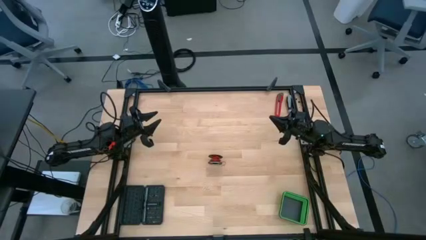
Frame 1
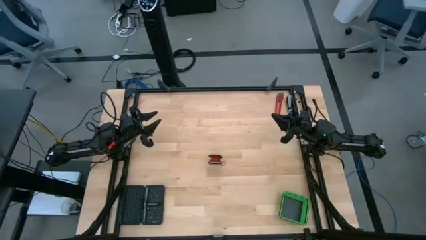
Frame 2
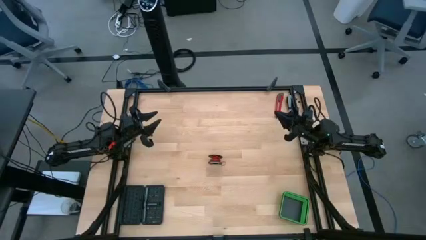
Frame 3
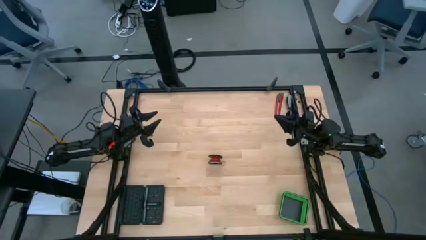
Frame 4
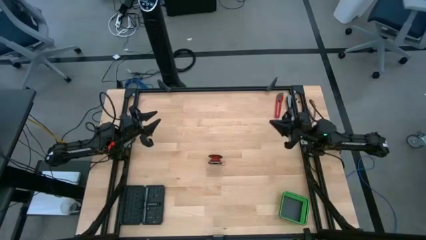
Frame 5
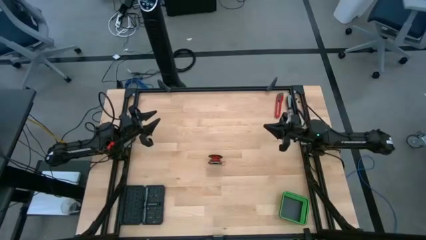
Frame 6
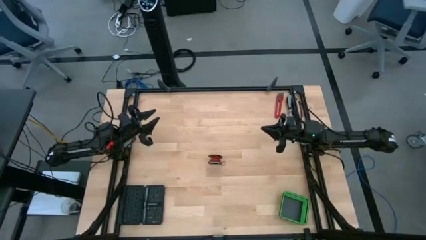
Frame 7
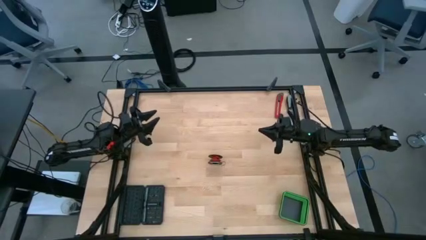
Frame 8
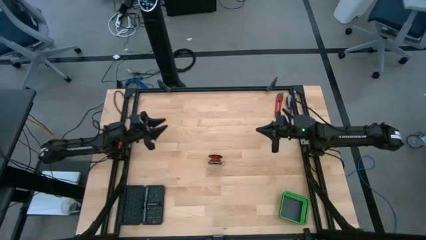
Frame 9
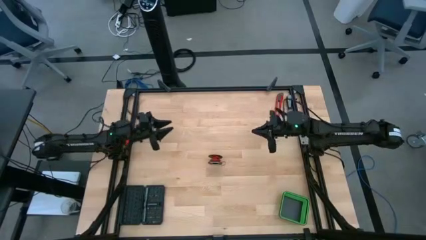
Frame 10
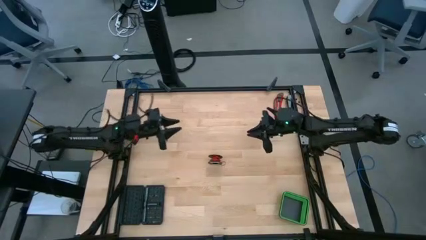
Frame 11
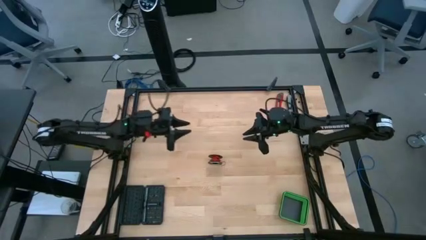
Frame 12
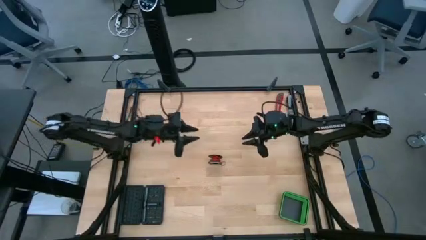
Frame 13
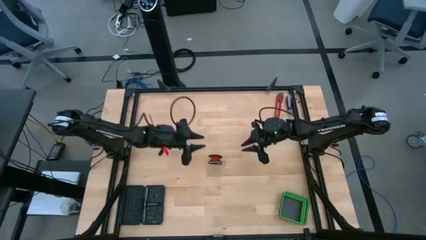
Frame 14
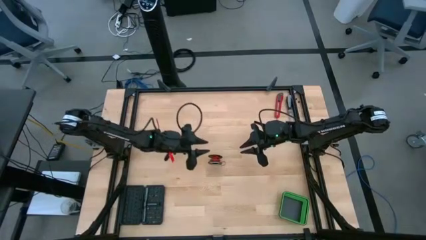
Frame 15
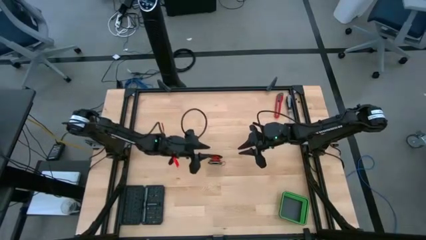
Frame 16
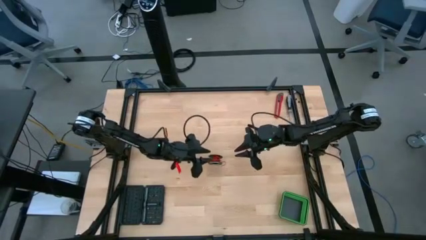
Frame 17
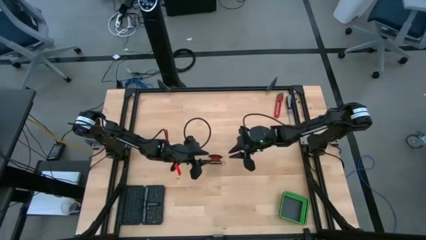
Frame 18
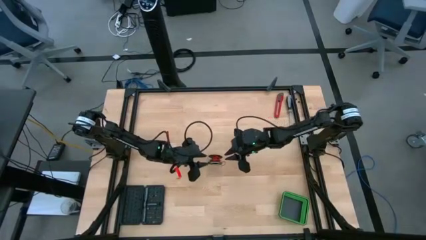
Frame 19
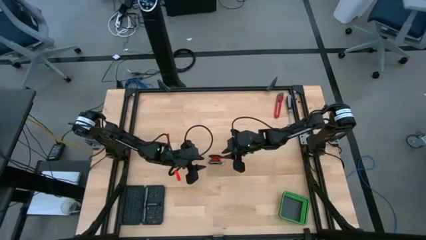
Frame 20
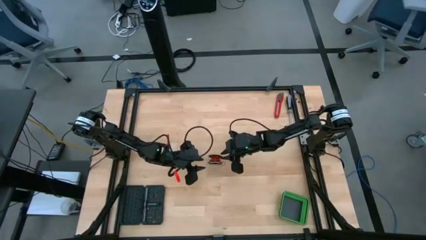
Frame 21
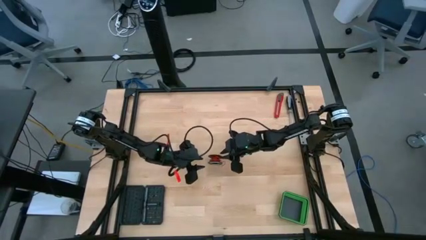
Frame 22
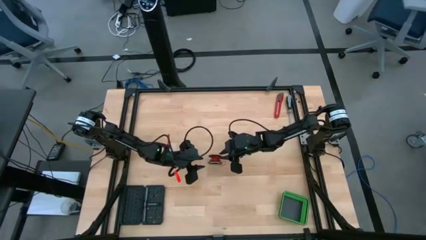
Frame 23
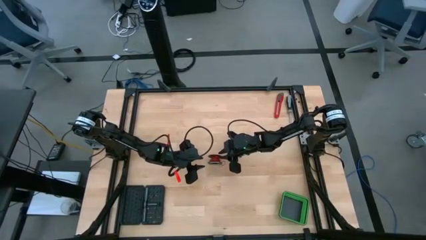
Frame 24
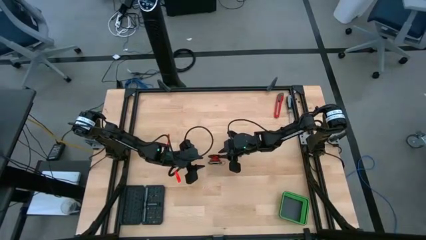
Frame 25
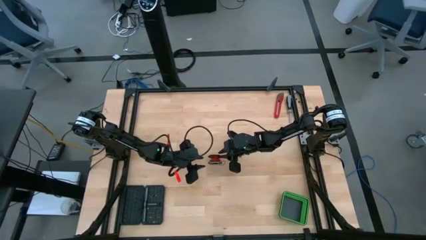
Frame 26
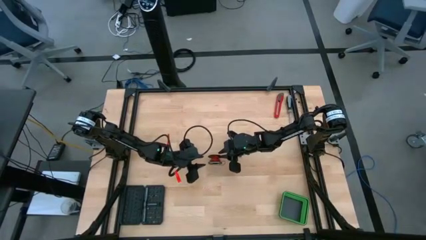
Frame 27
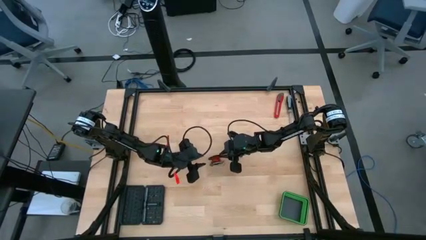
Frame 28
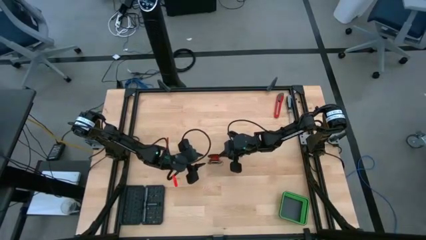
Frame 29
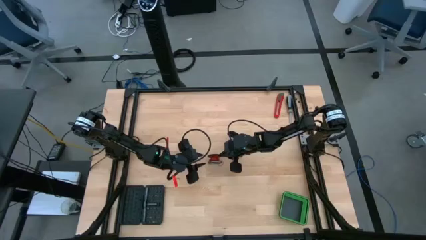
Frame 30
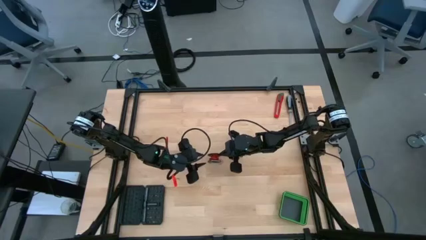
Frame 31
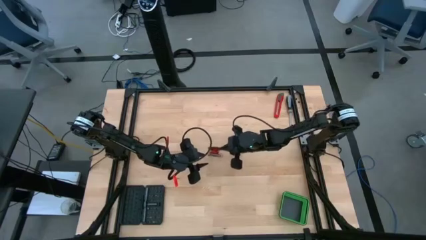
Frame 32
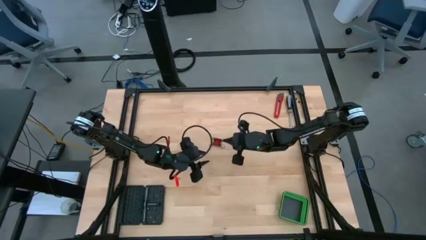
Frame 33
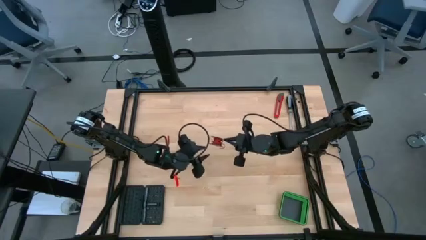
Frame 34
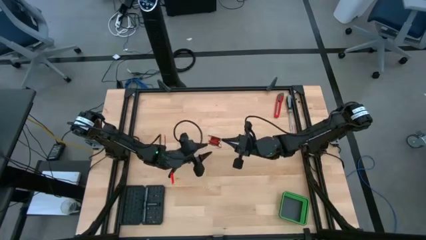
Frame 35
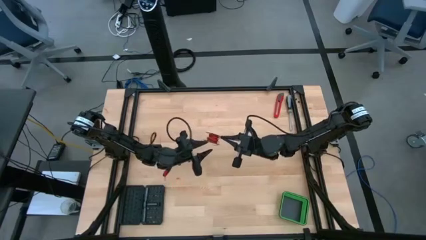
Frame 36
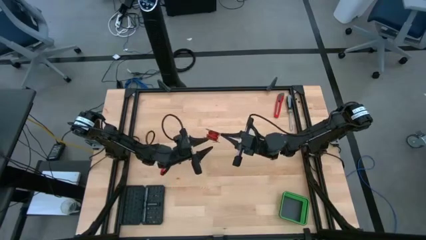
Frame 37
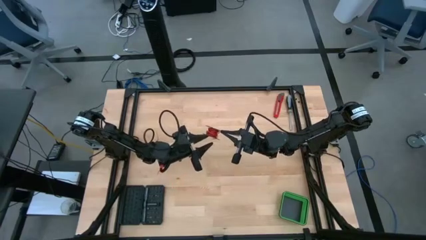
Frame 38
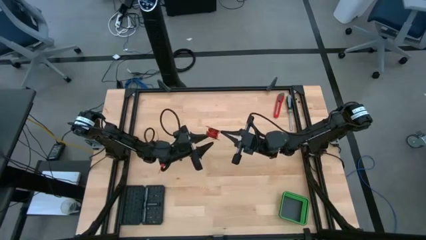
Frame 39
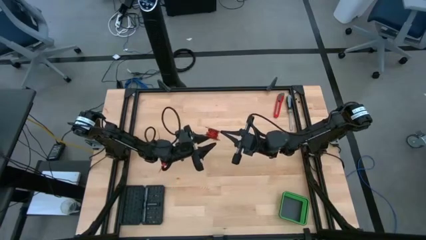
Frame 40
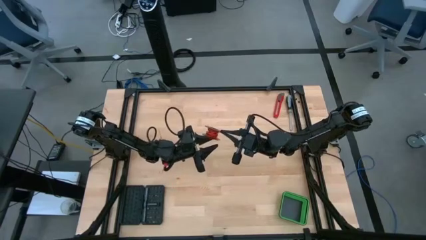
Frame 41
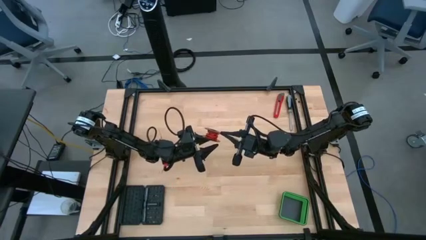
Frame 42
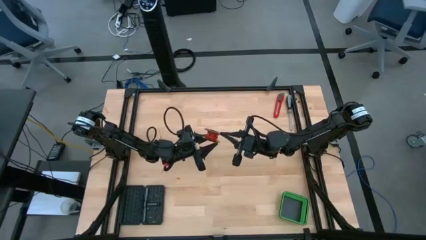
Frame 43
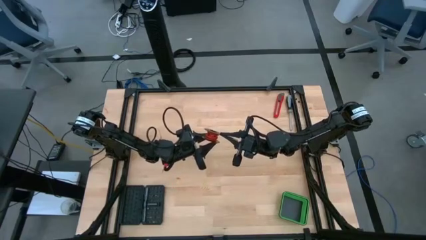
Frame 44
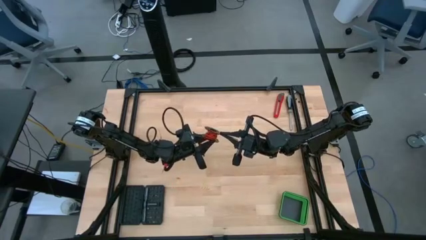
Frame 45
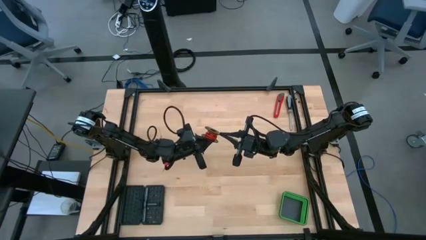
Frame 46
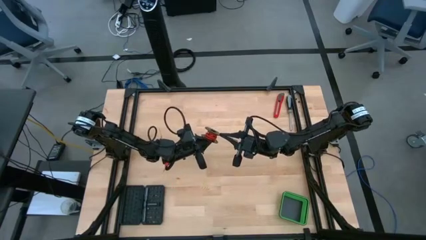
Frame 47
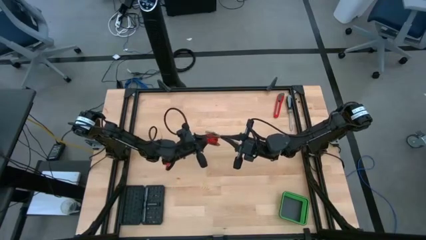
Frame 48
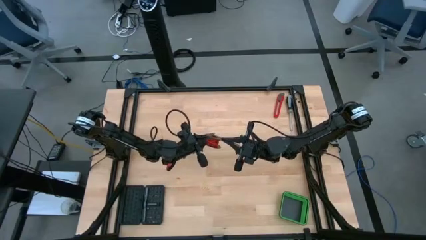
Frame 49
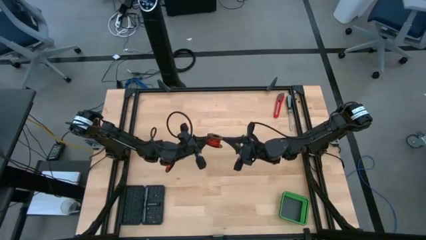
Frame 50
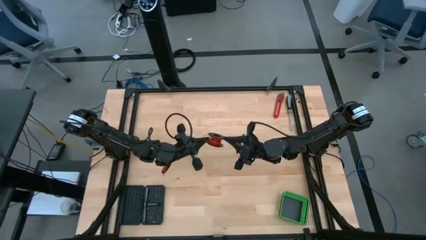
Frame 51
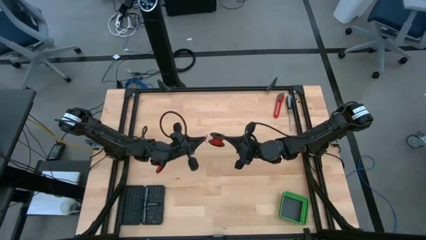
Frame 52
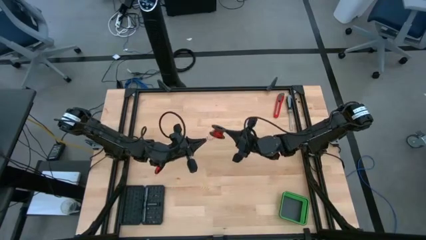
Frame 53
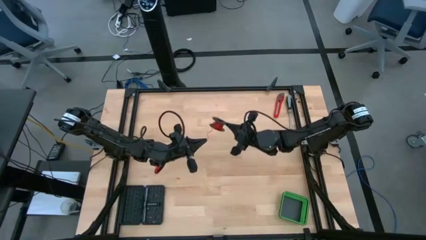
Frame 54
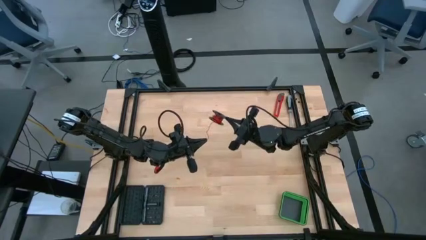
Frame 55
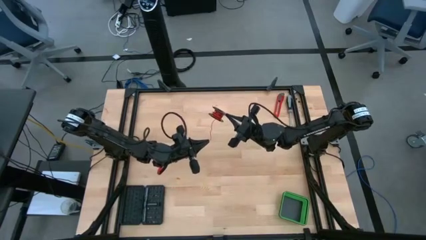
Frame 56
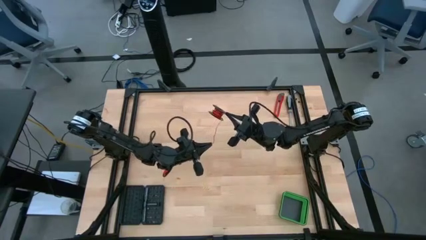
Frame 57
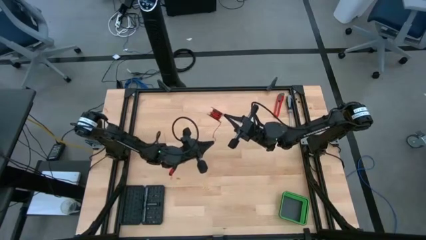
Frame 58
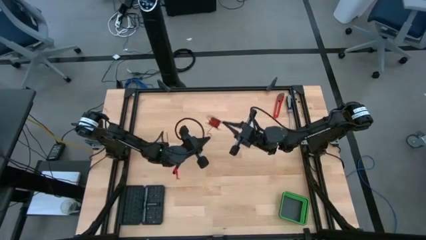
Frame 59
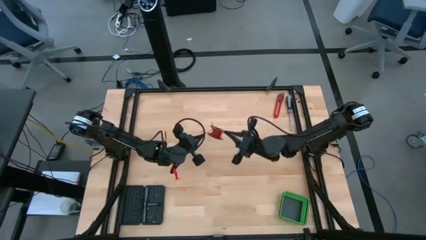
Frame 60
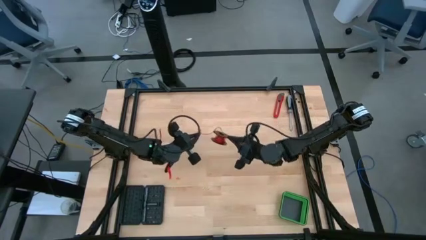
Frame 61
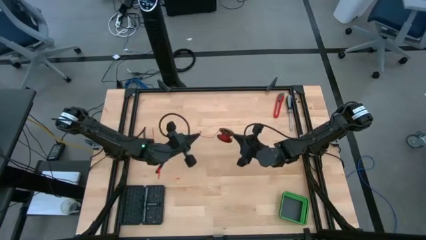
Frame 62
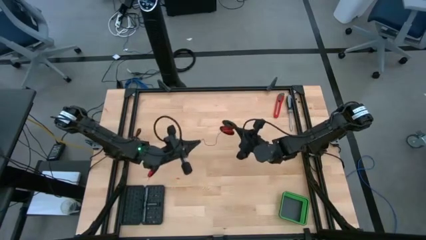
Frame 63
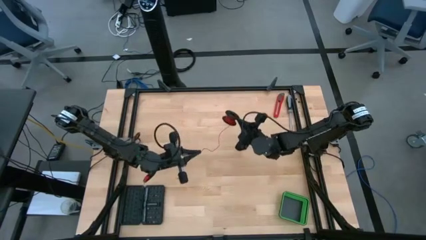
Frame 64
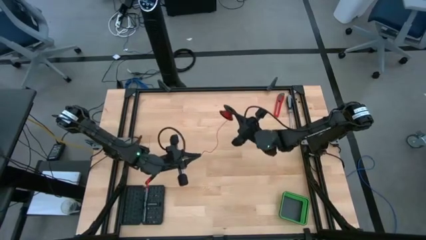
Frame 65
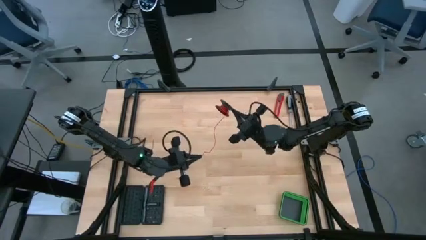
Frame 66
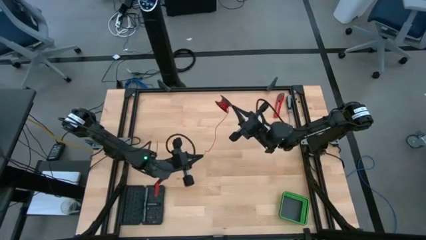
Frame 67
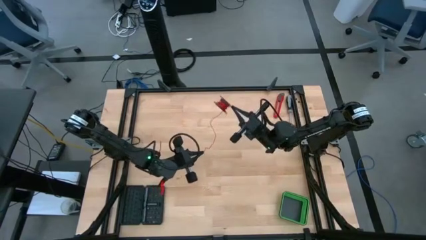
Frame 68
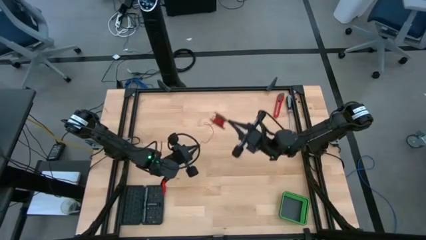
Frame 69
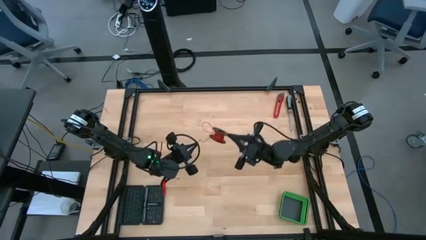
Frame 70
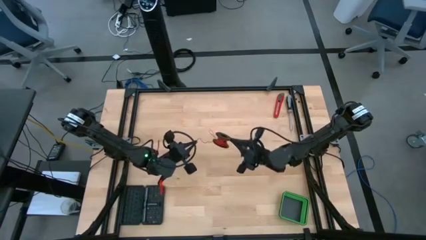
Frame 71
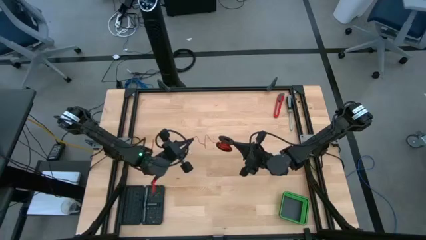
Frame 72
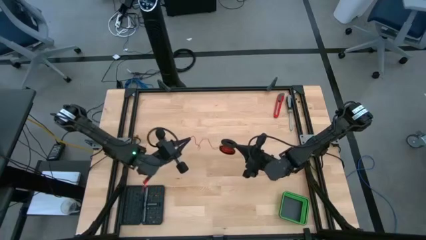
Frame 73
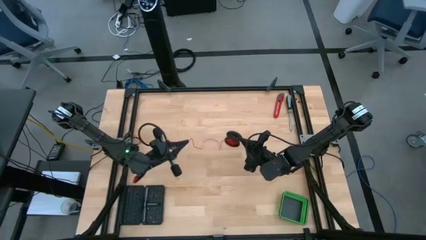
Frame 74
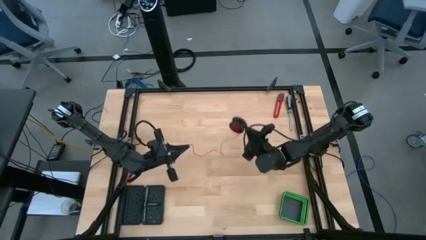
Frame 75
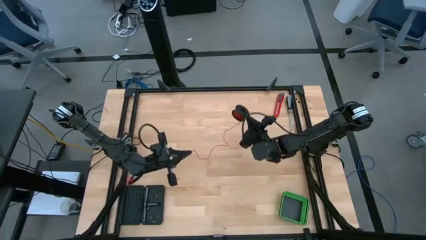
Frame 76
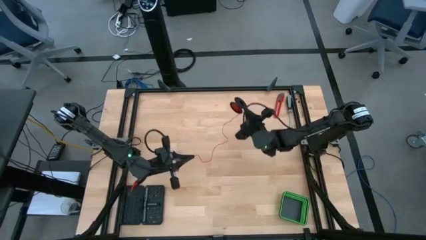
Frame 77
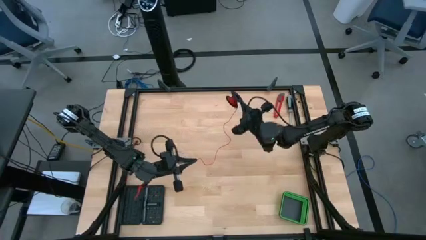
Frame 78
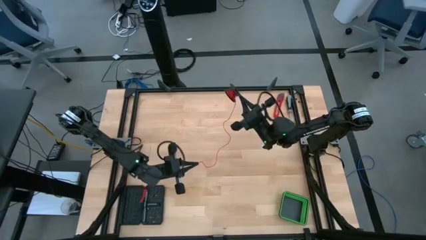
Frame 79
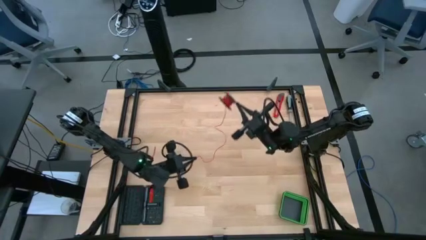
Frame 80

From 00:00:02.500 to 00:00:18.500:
Task: Coil cords
Uncoil the red wire from the black spool
